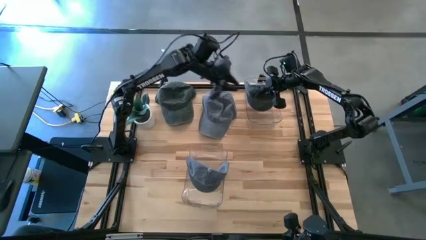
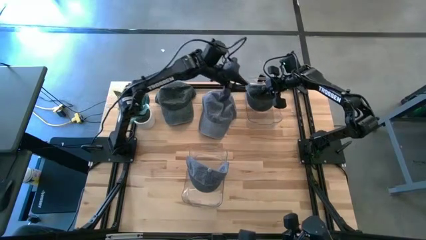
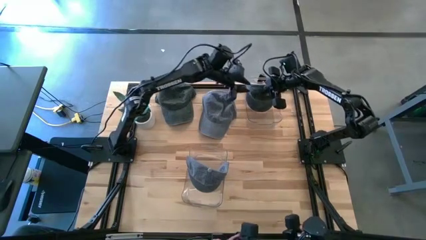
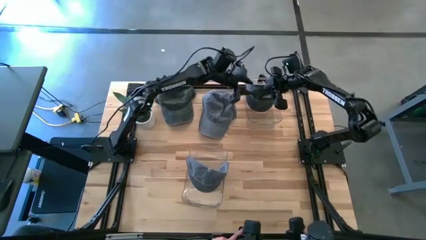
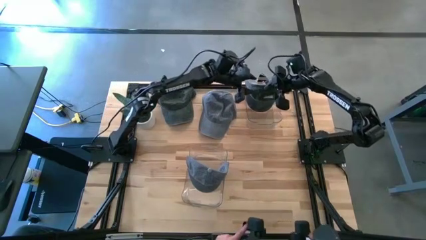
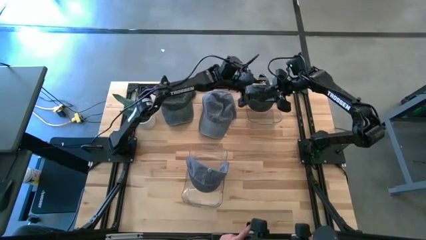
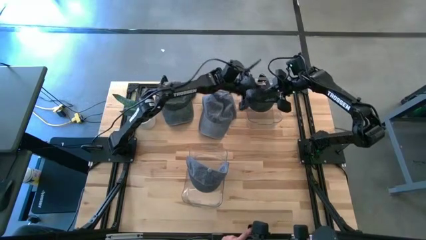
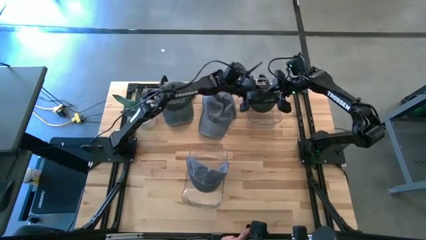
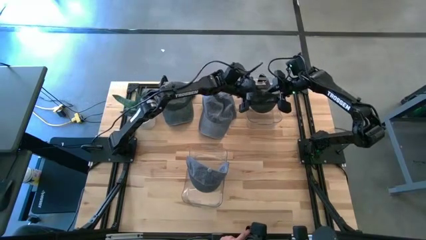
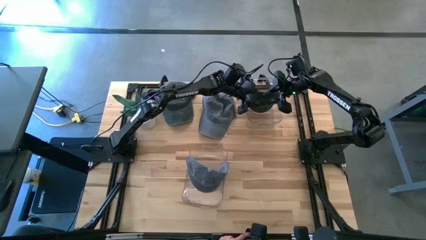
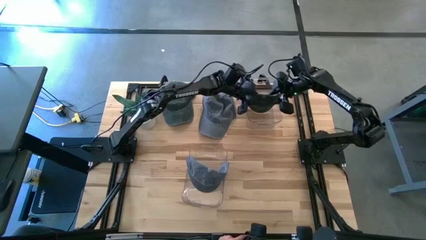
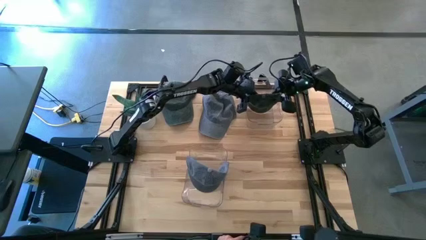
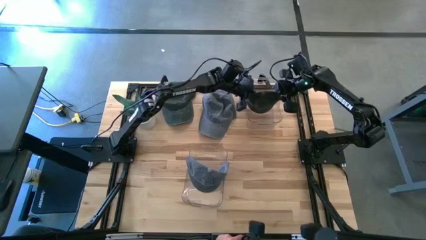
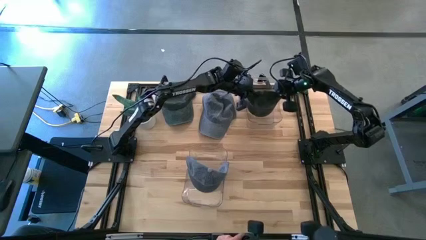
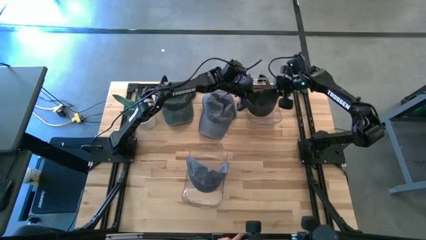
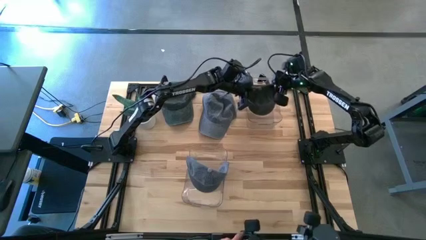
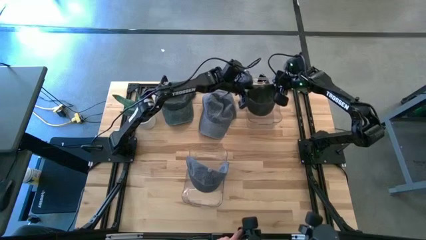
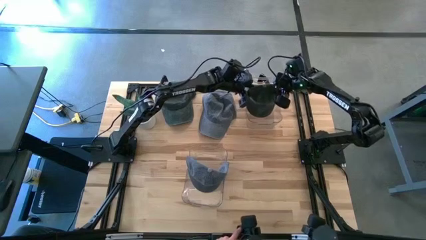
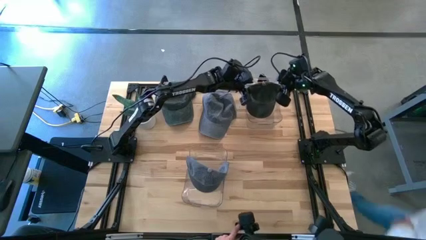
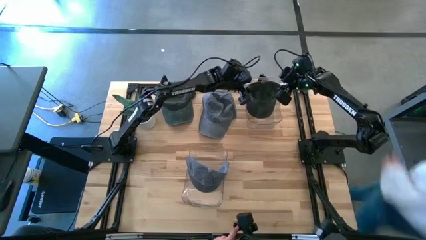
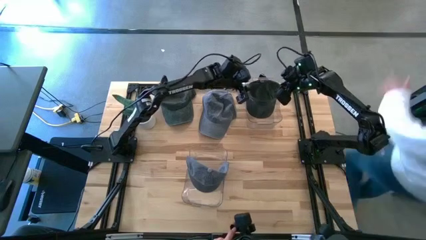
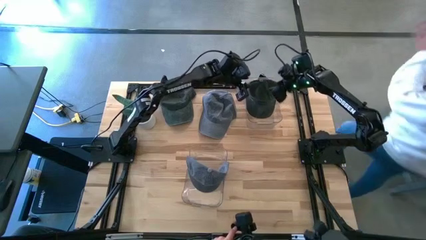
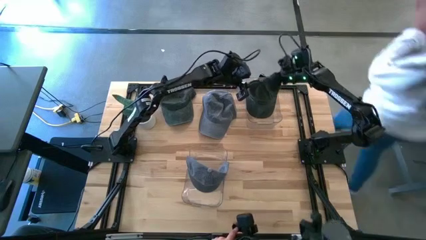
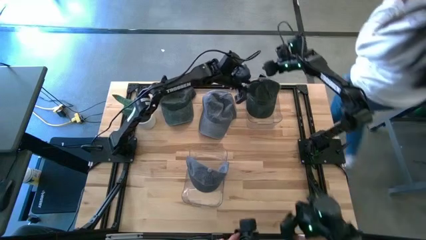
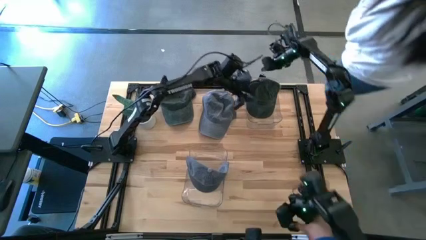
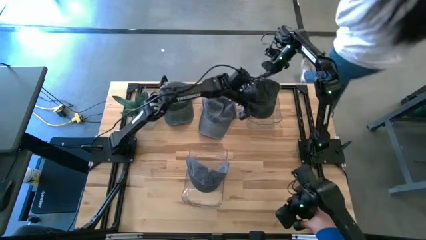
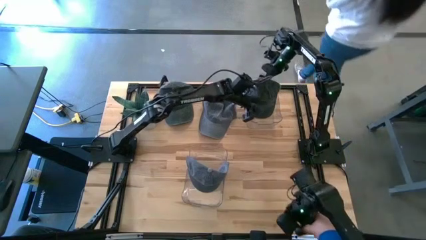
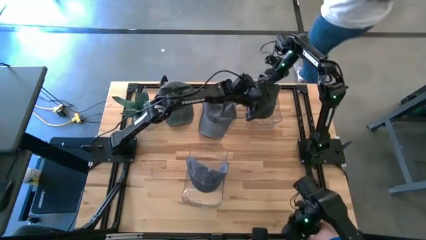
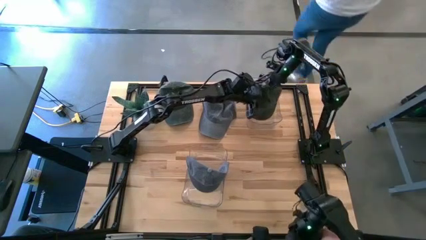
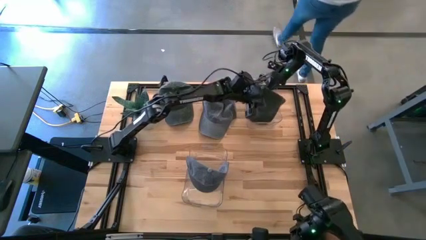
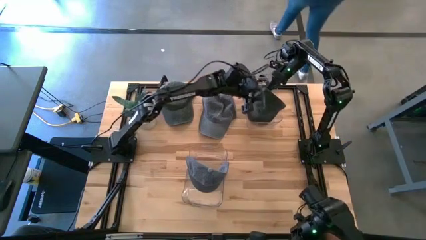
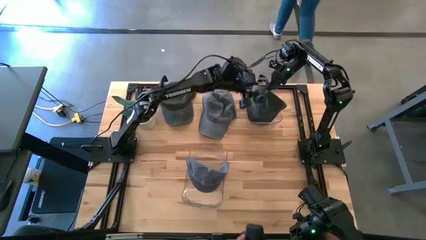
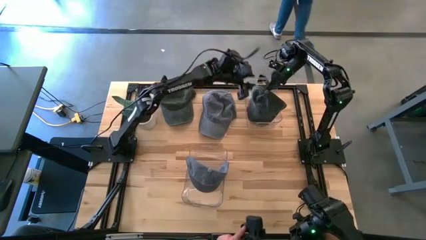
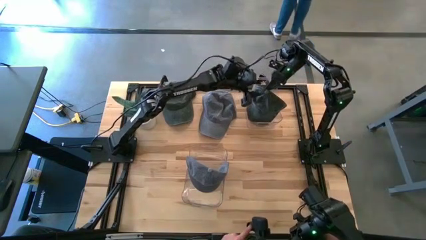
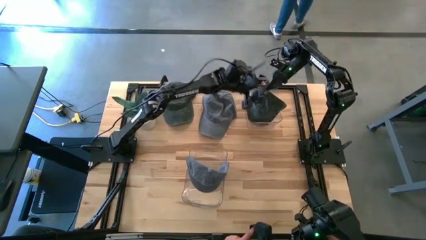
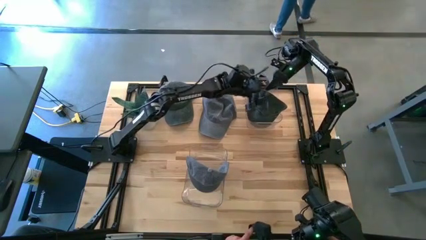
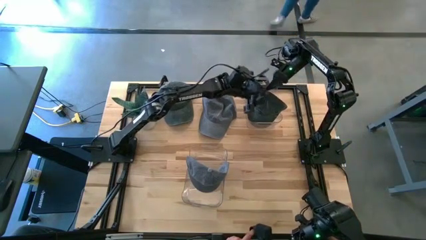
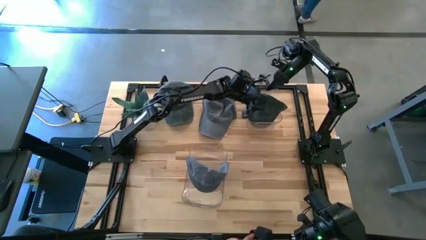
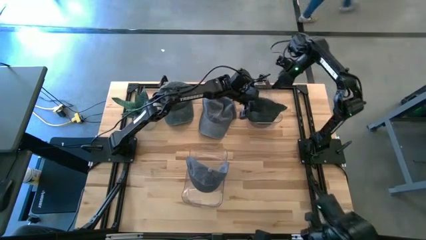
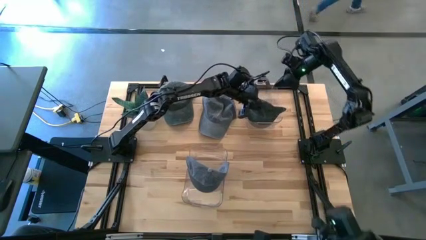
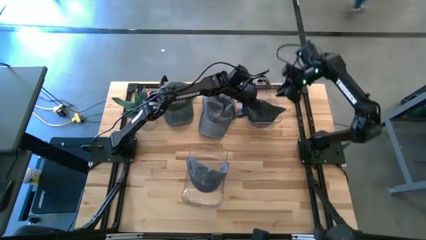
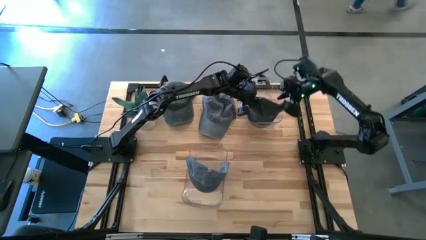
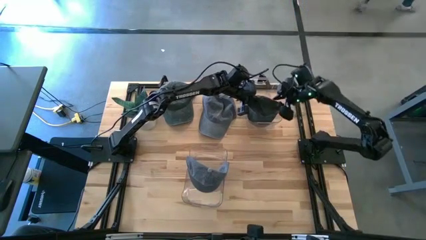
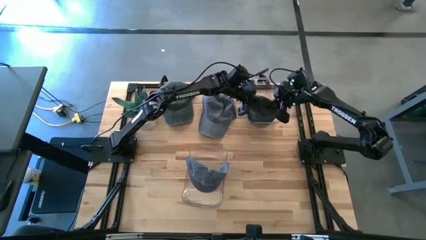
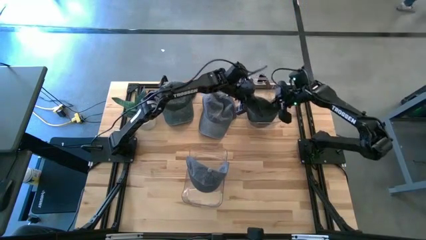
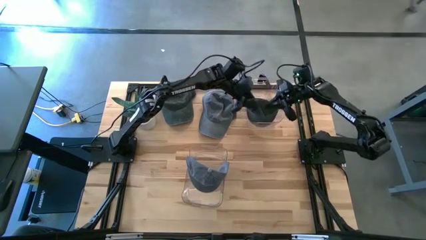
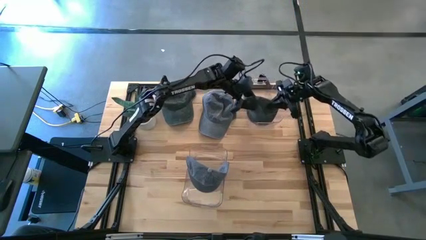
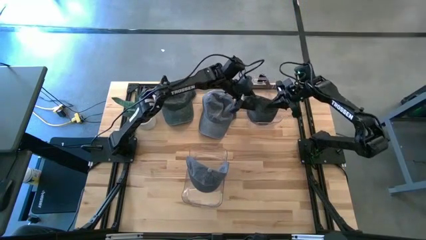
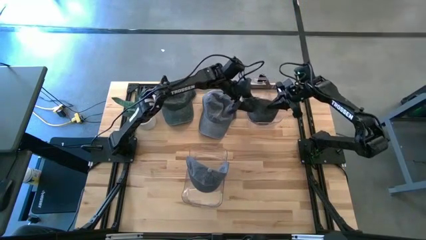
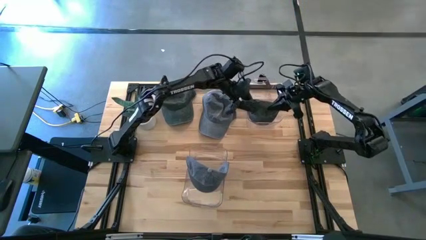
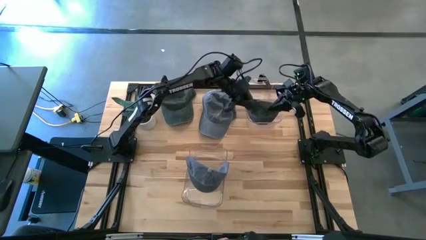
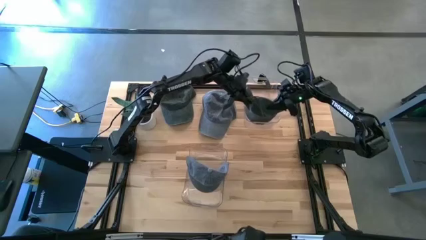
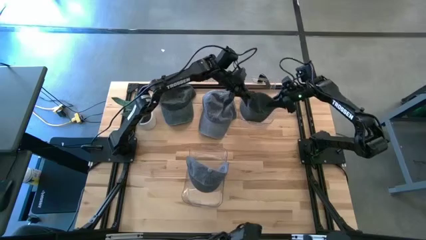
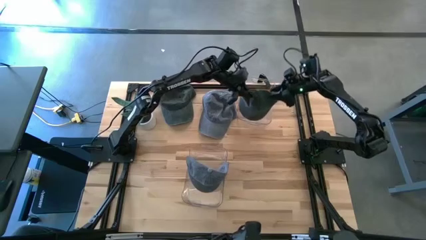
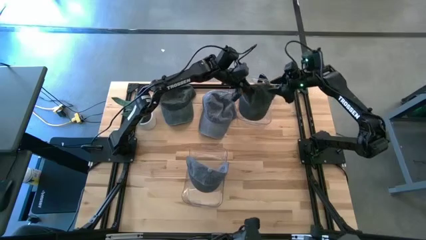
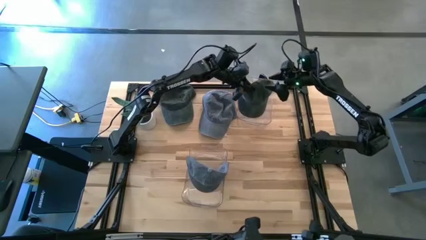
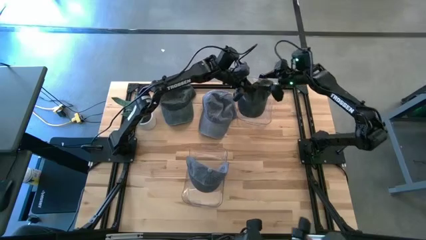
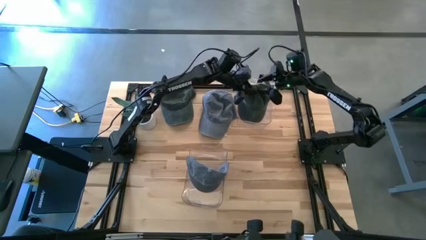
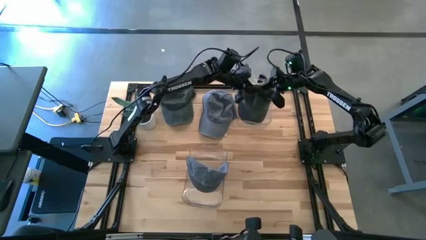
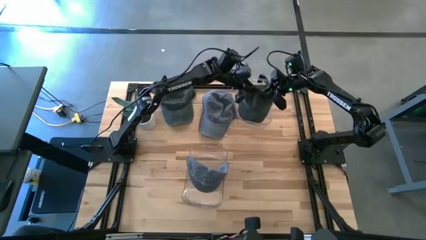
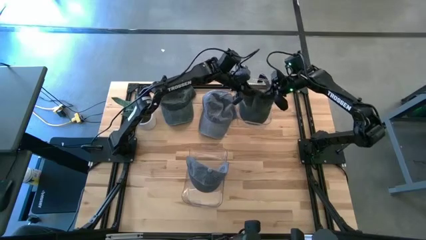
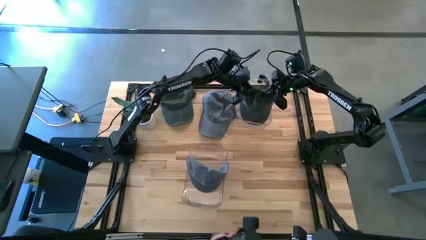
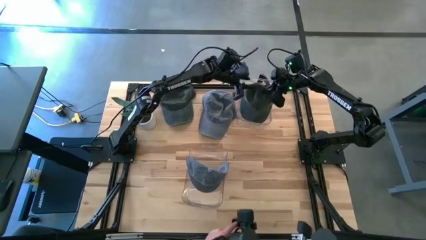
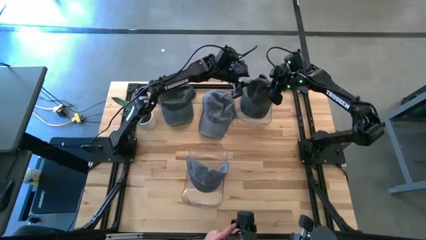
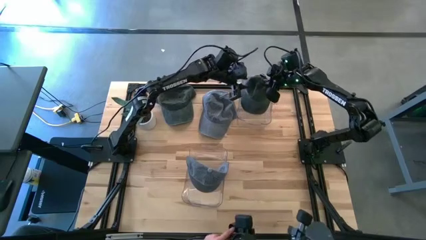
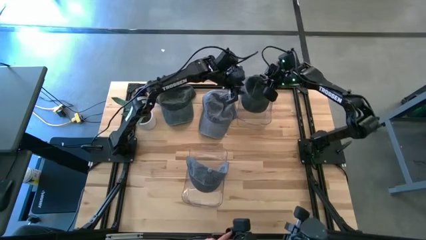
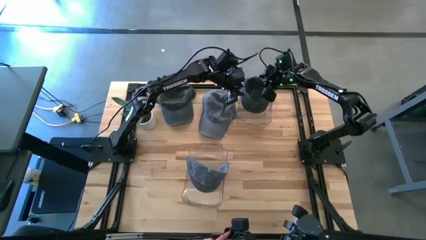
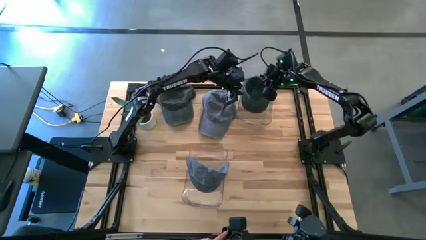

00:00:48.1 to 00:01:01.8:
Task: Pick & Place hat
Put the bottom black cap into the top transparent bin

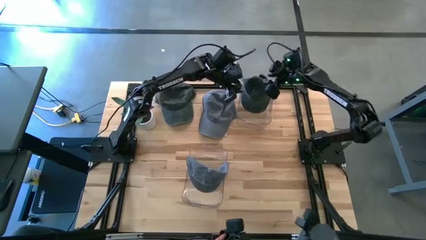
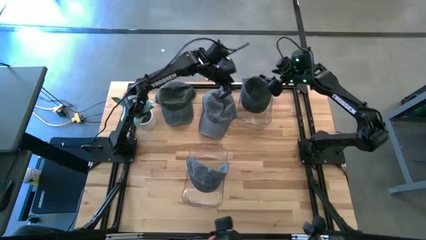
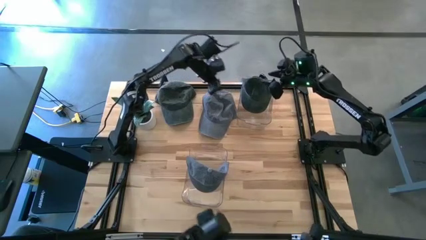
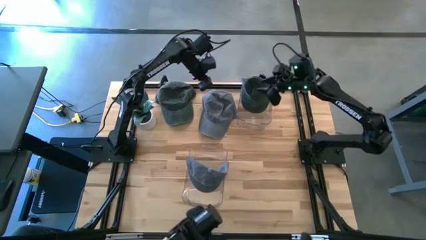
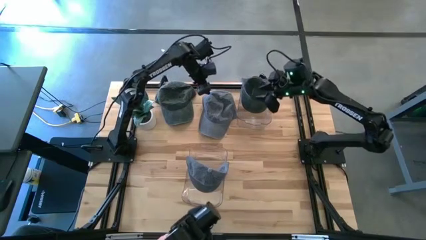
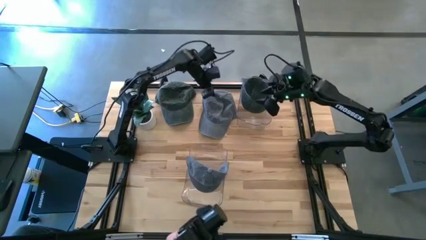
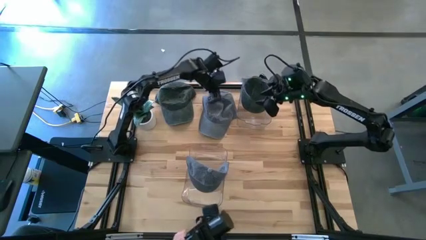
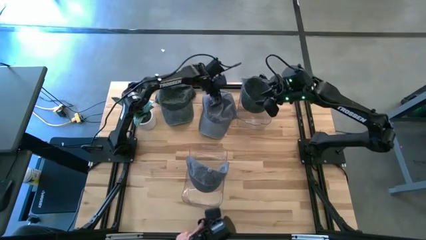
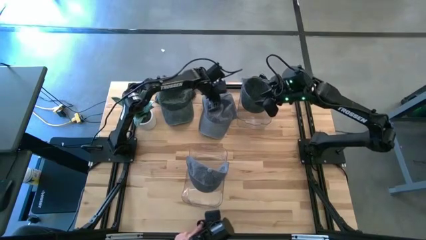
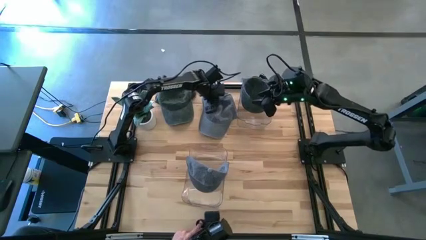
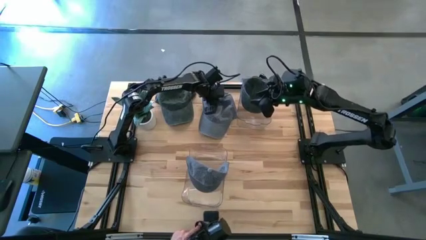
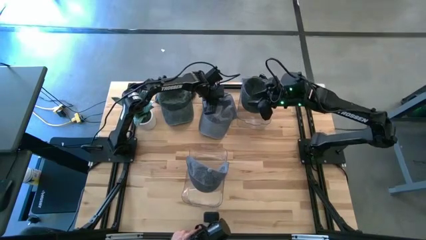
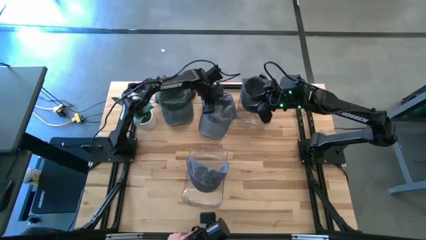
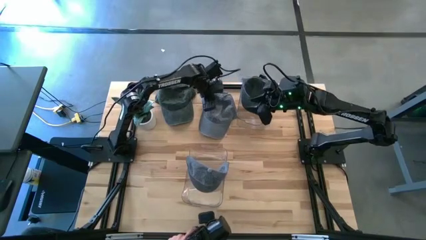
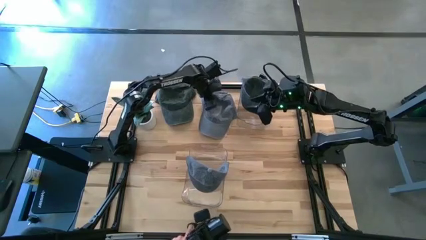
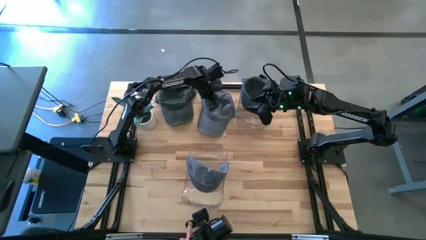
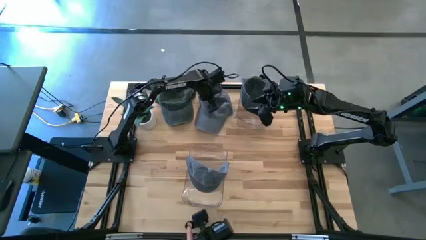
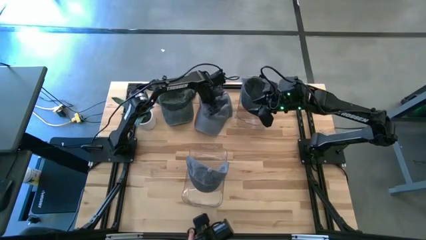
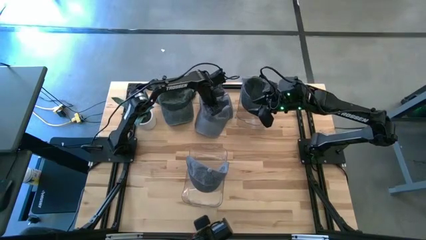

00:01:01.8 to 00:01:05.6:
Put the gray cap into the bottom transparent bin
